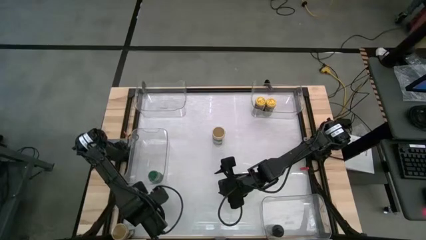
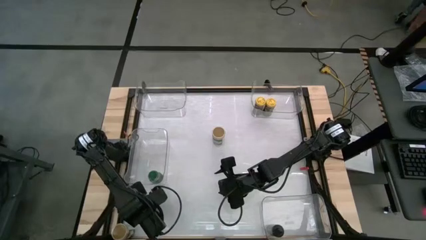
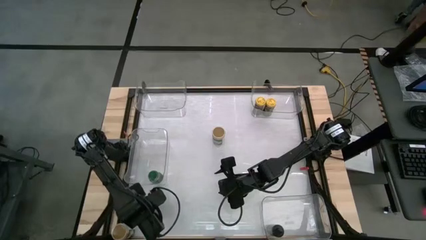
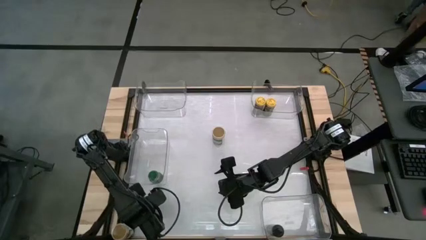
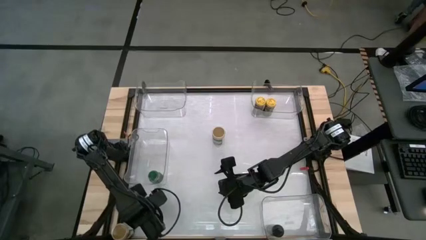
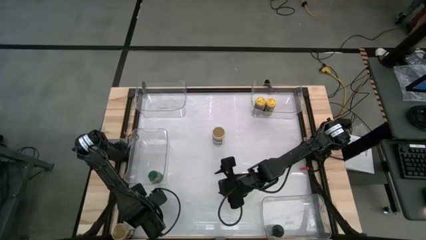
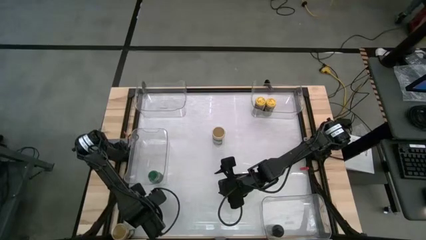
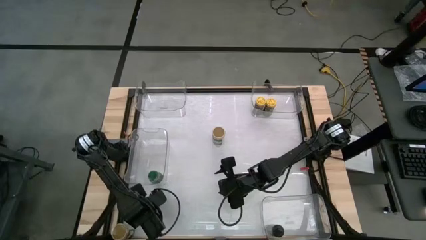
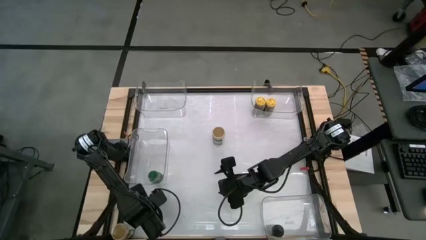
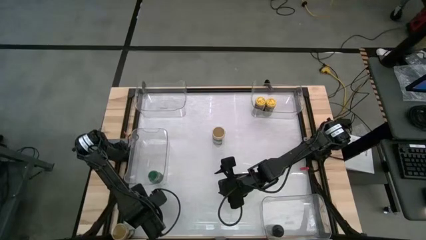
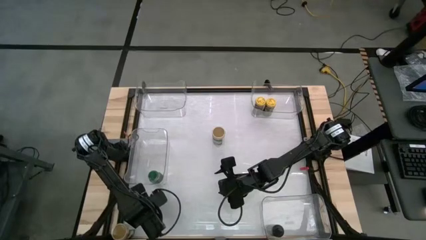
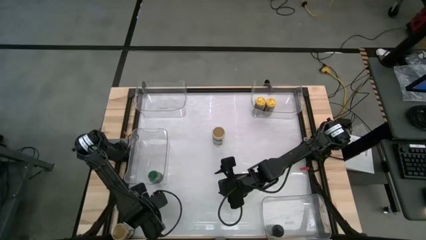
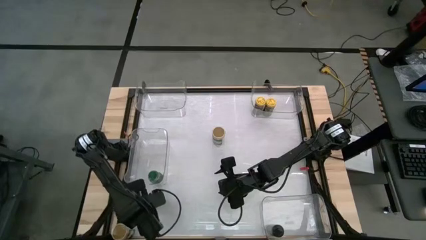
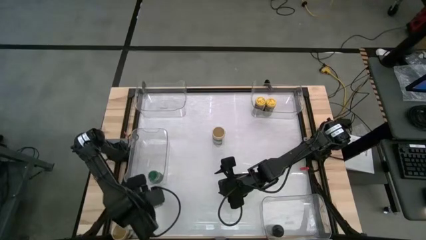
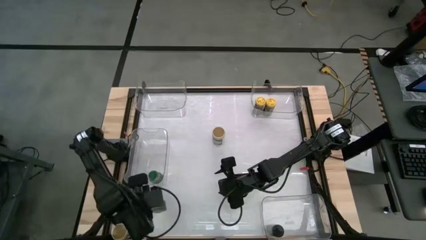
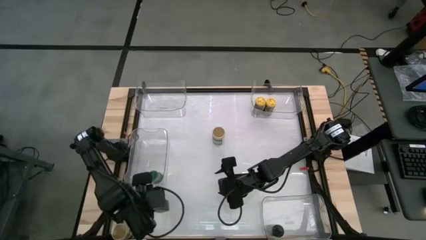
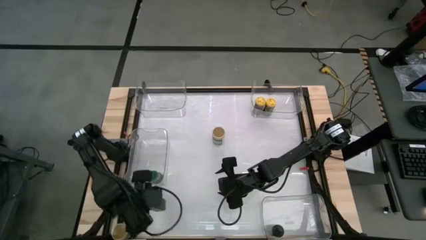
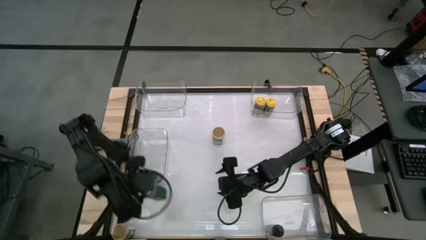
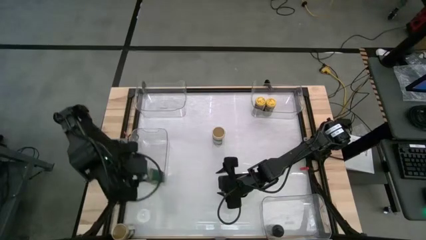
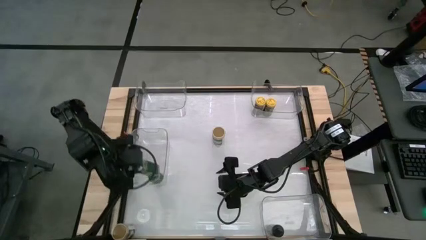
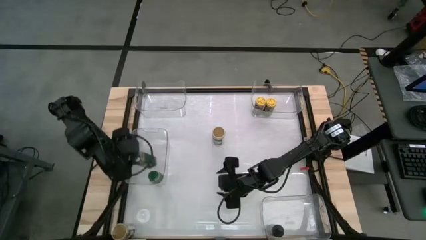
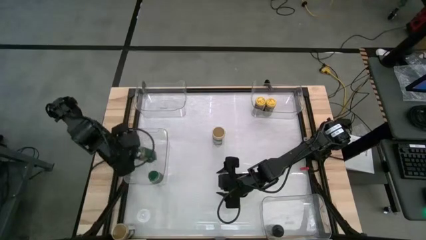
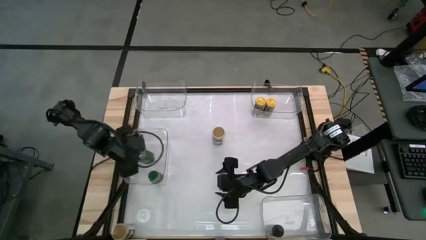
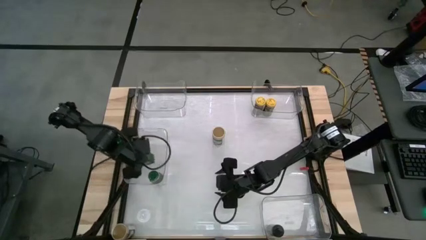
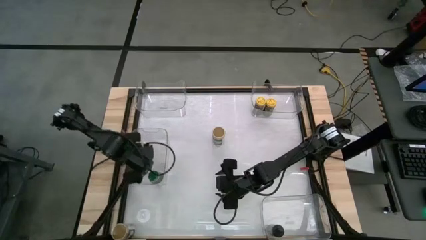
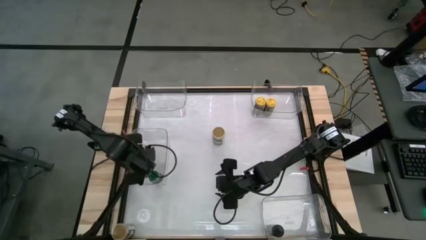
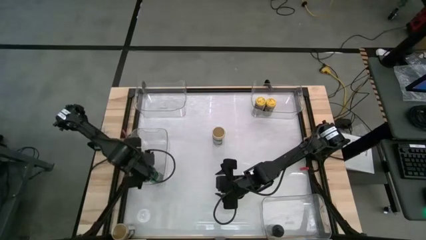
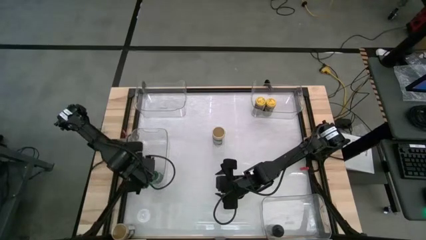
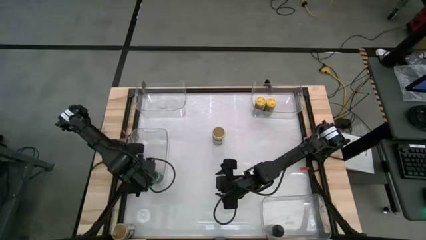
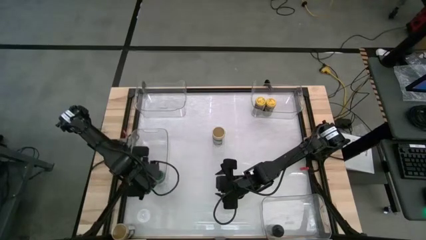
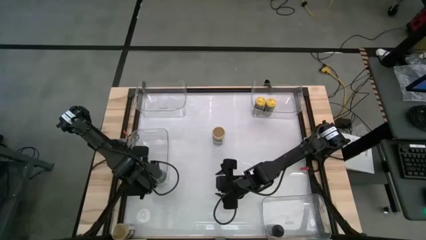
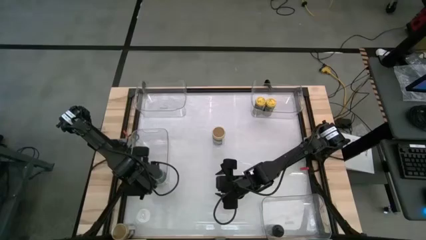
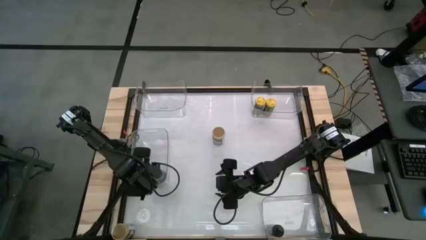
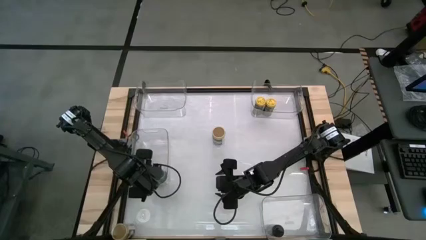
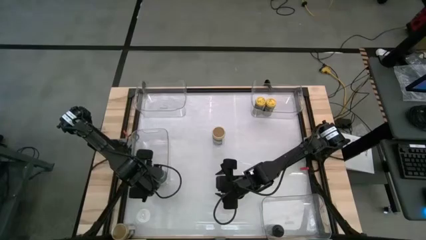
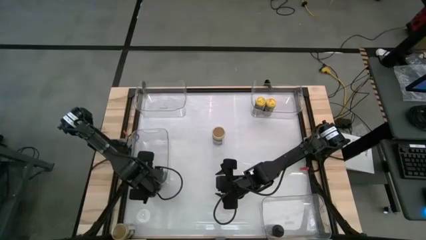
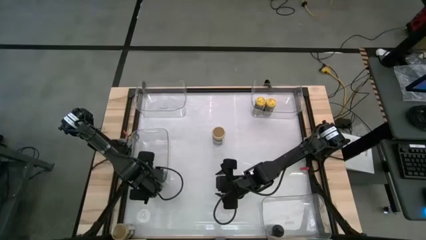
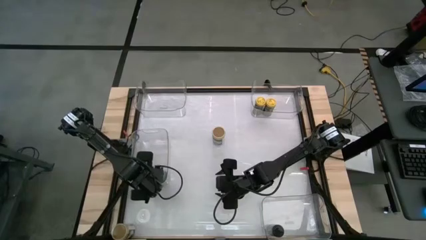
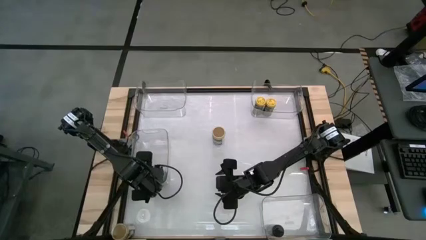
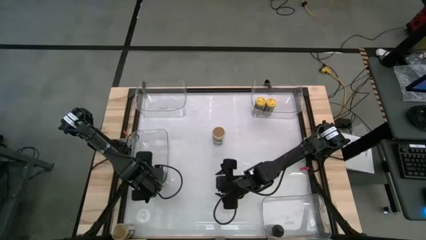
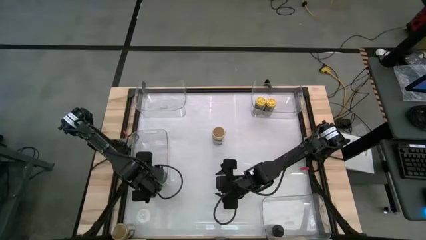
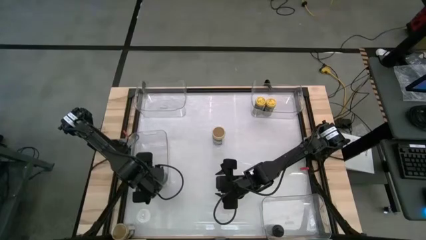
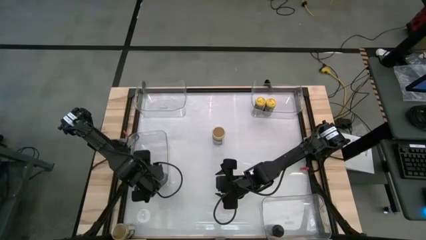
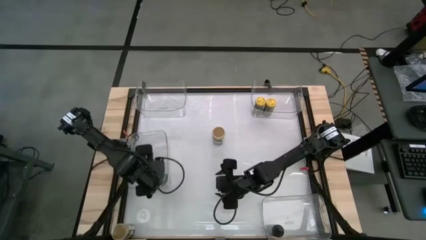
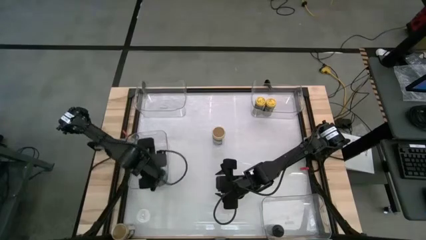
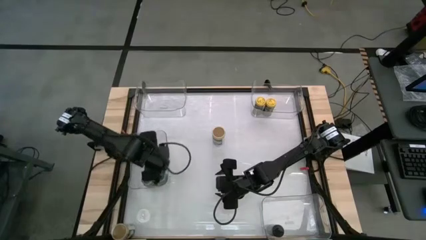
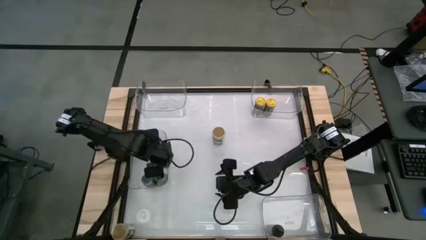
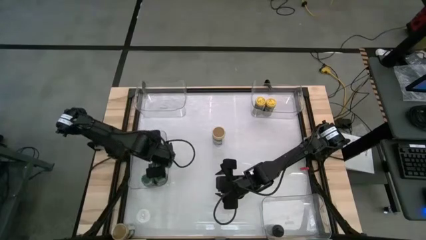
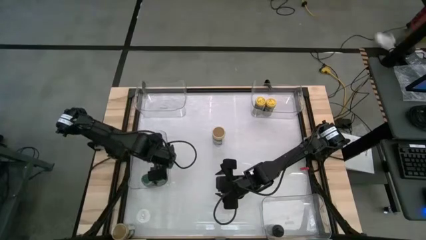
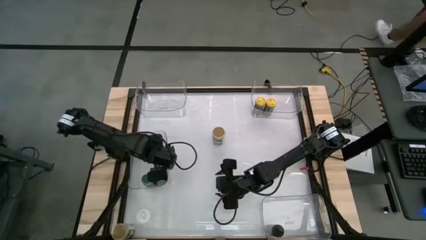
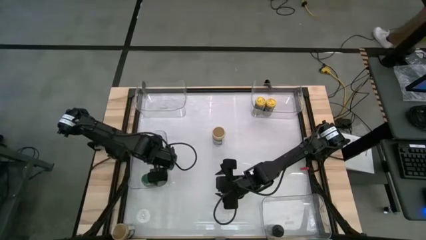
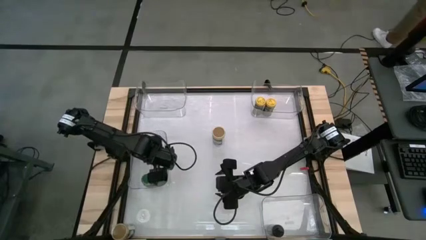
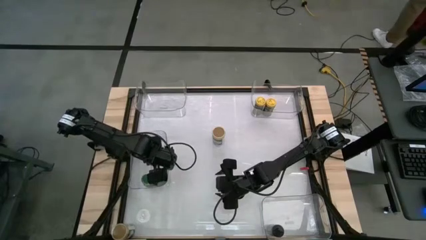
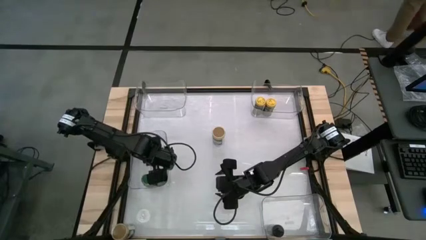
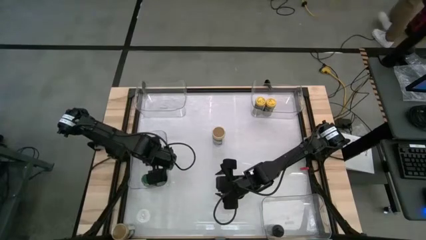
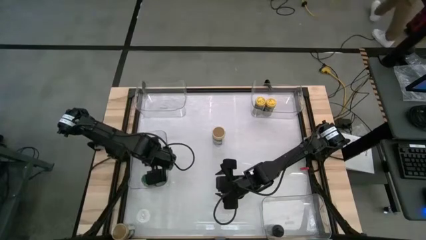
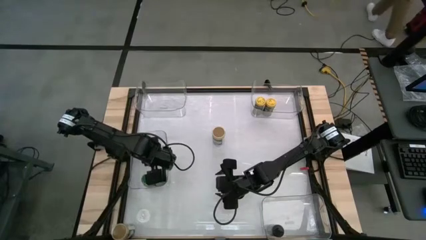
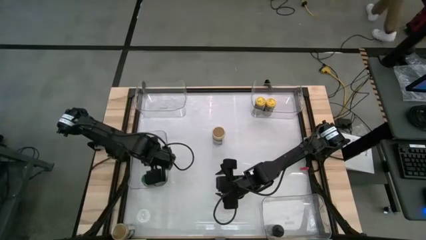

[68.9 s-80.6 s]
Task: Sort spices by type
Put the green seasoning bottle into the middle transparent bin

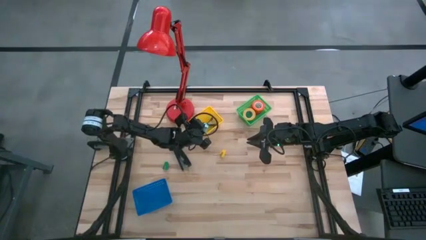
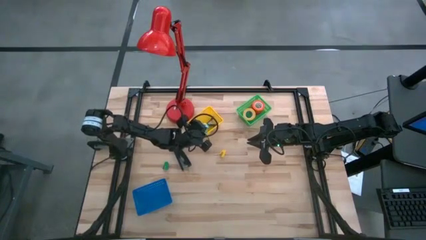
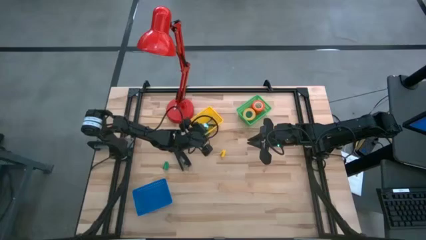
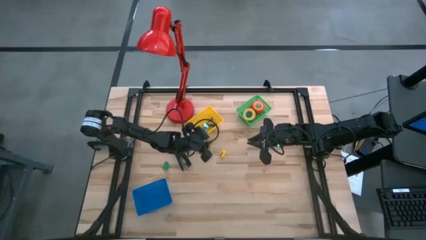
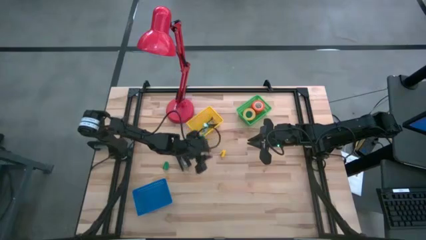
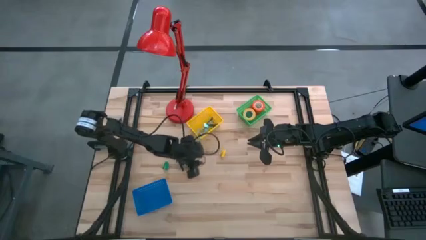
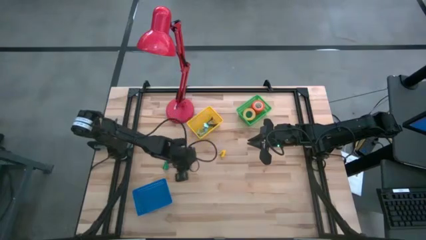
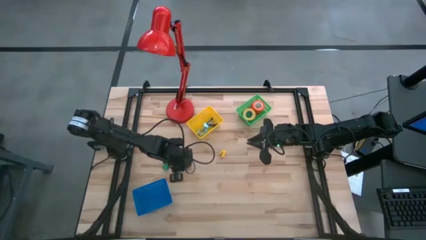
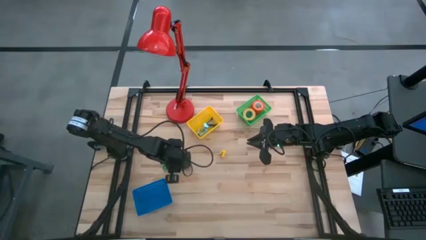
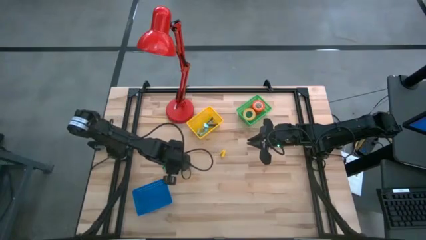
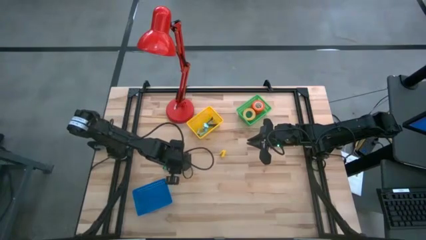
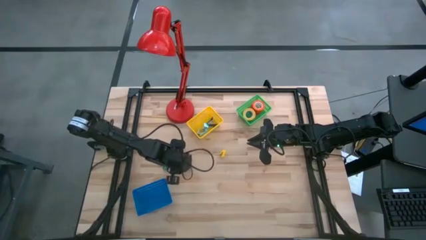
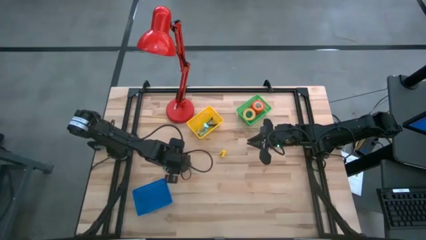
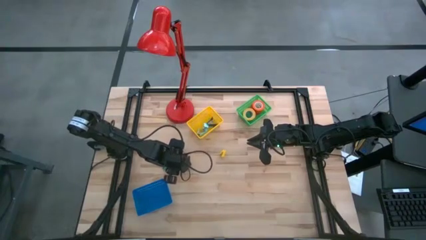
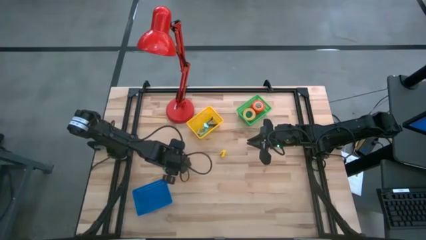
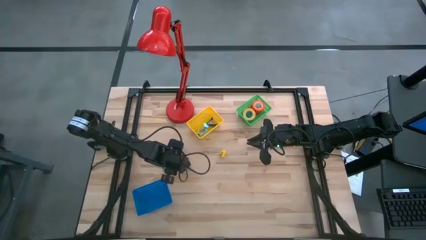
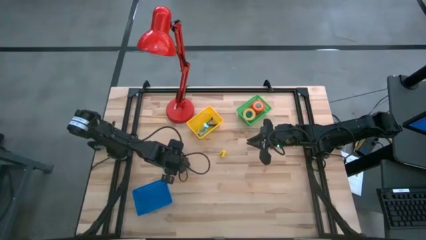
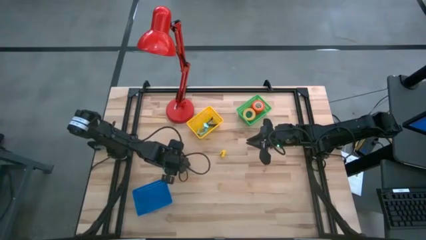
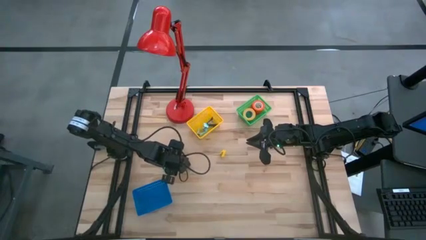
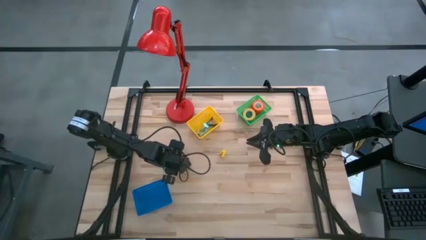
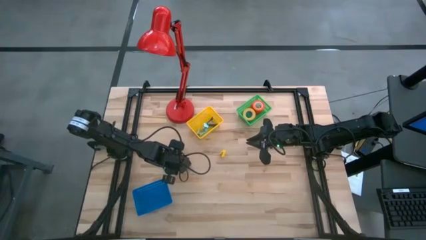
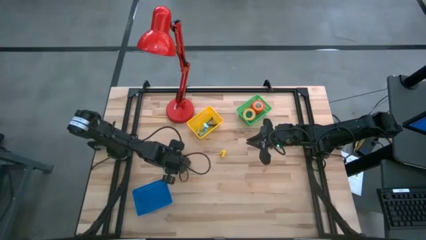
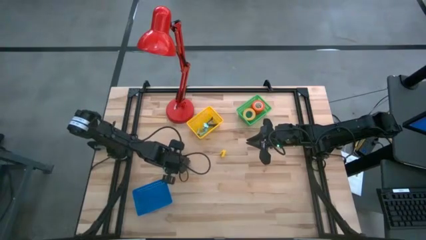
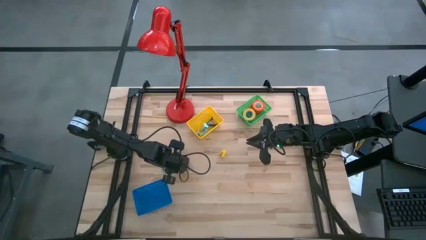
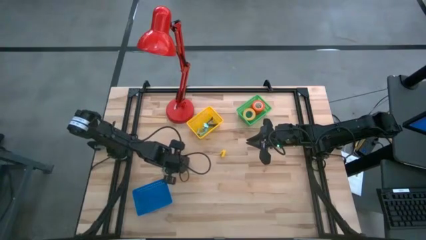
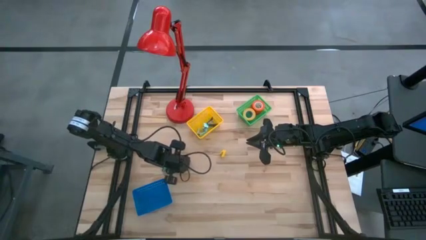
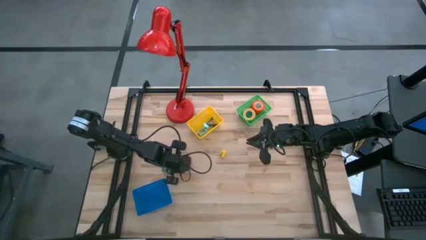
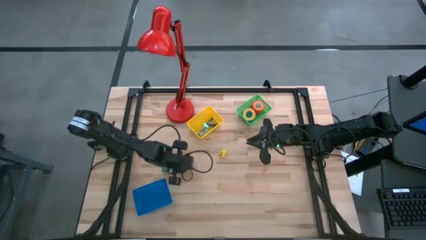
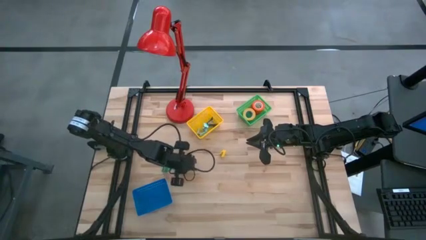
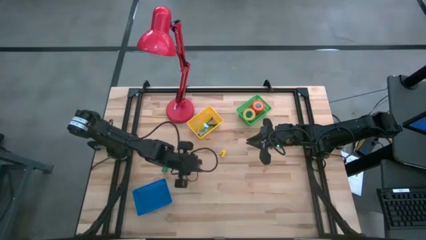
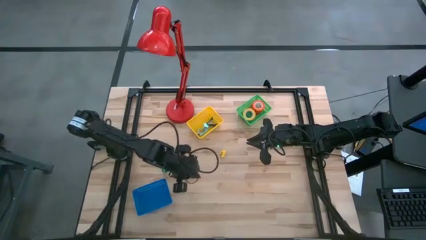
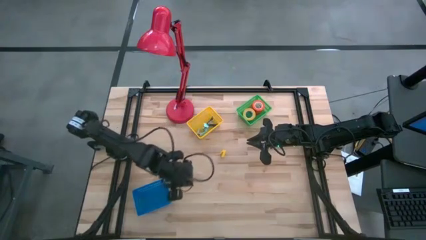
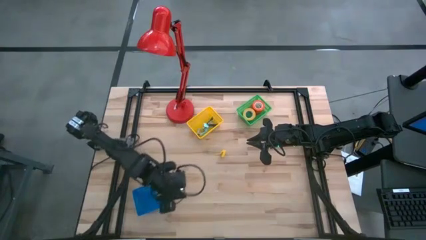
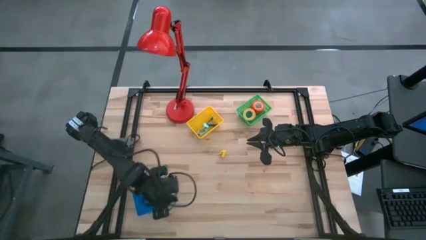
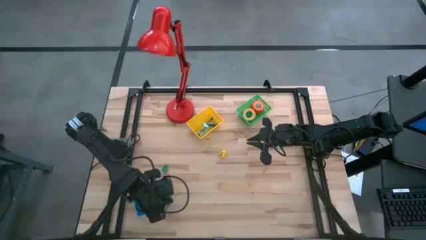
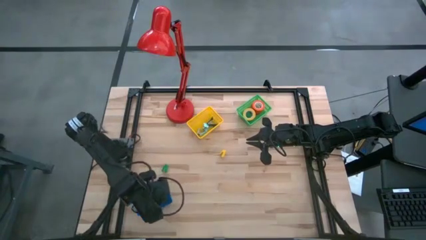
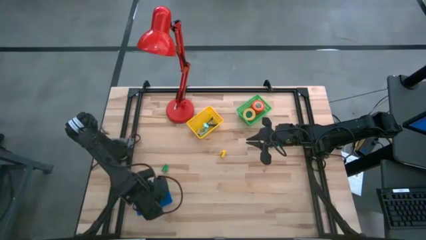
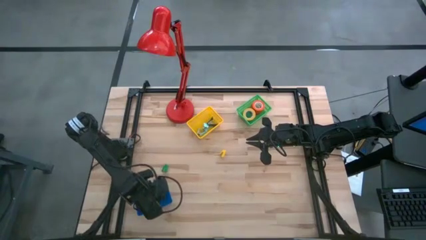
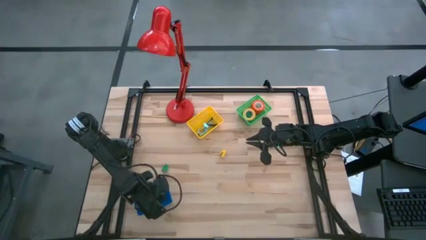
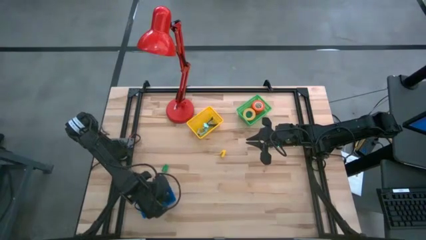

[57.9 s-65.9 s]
Task: Pick and place Stapler, Stapler remover, tape
Put the black stapler into the blue bin
